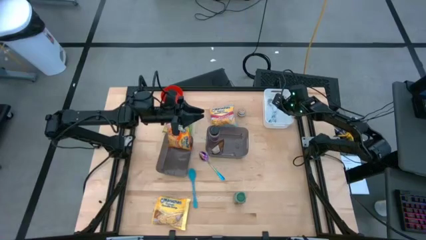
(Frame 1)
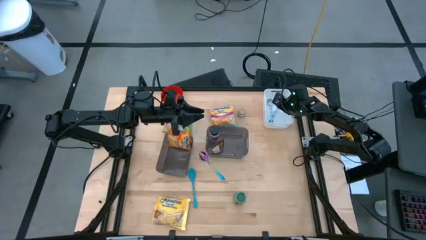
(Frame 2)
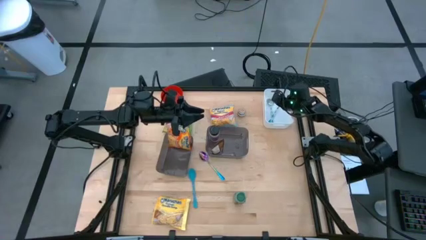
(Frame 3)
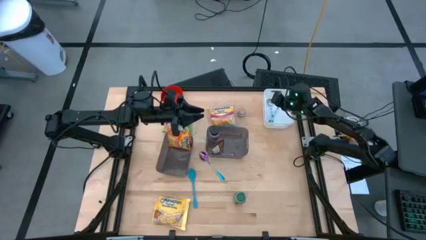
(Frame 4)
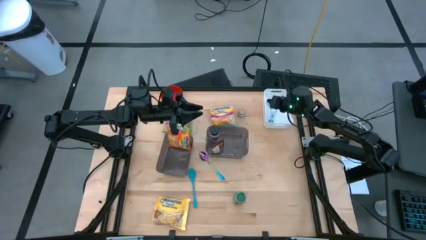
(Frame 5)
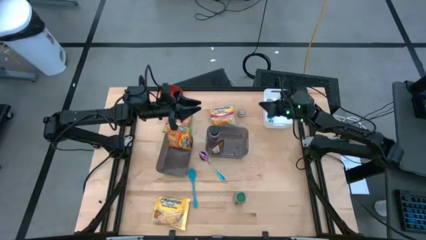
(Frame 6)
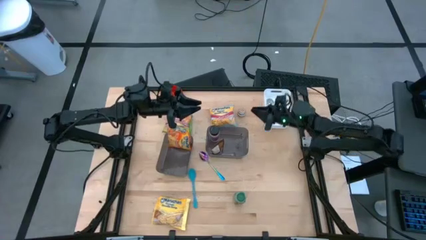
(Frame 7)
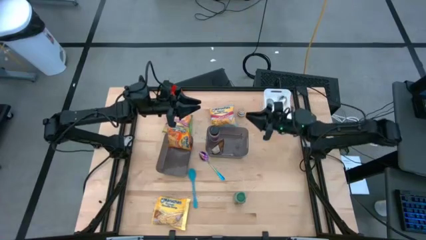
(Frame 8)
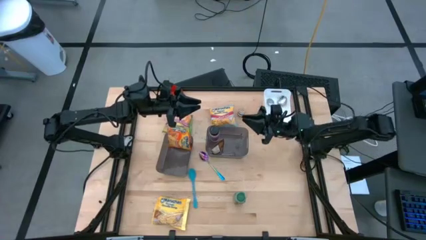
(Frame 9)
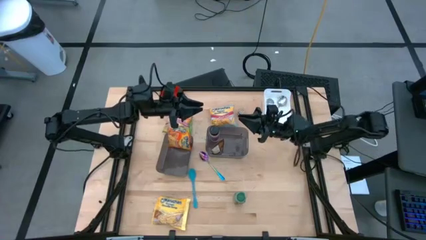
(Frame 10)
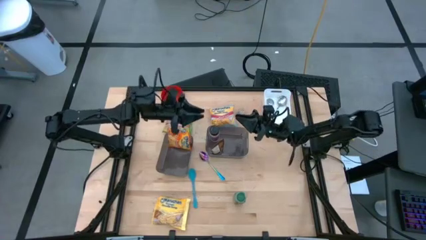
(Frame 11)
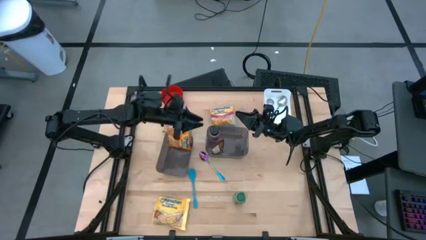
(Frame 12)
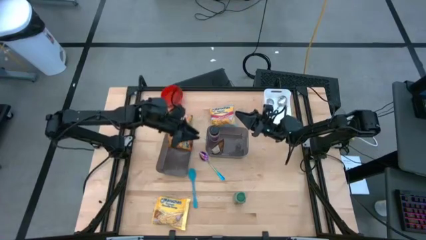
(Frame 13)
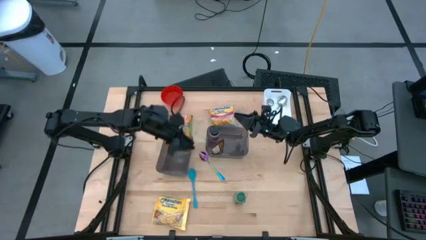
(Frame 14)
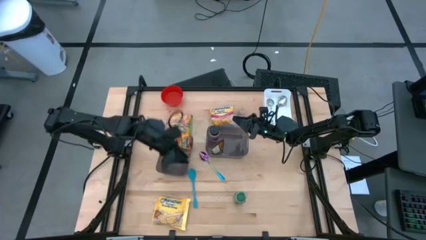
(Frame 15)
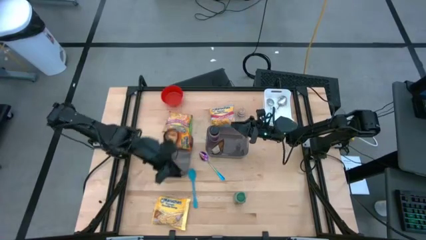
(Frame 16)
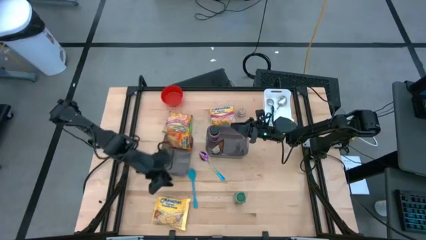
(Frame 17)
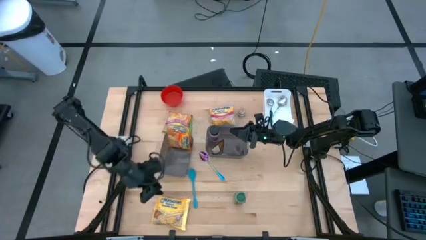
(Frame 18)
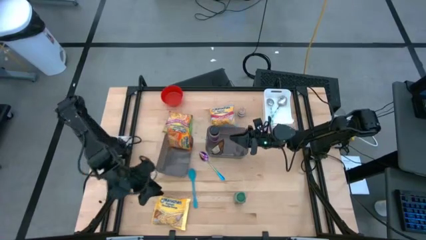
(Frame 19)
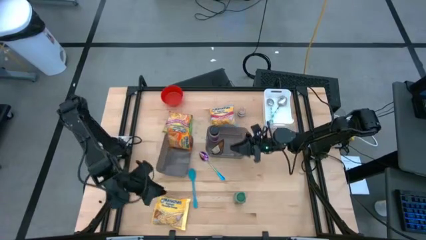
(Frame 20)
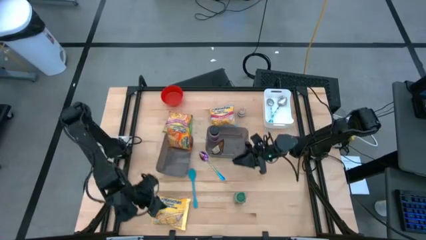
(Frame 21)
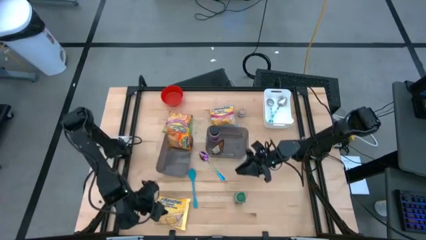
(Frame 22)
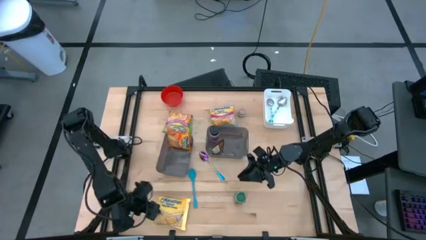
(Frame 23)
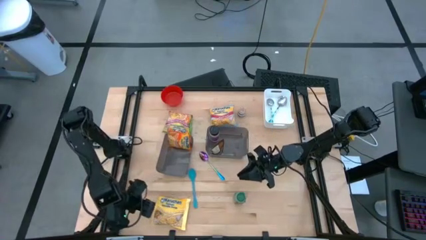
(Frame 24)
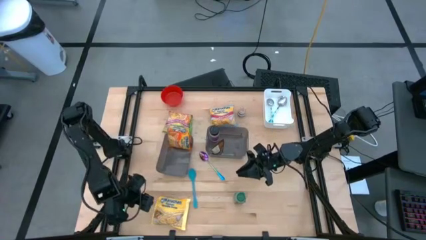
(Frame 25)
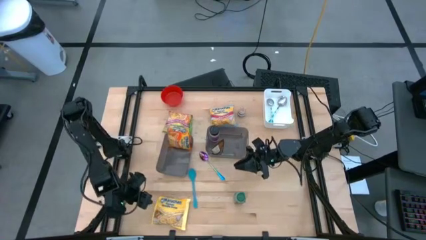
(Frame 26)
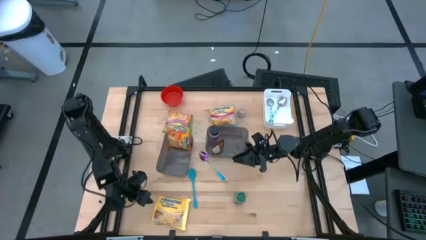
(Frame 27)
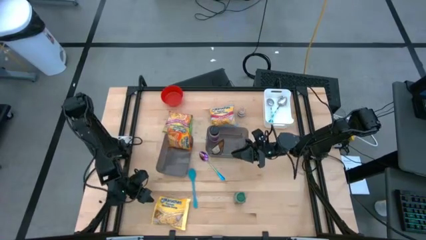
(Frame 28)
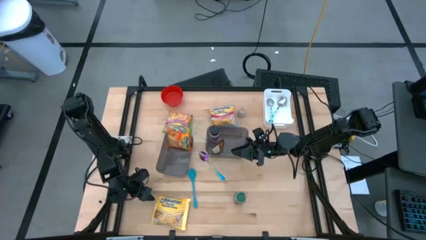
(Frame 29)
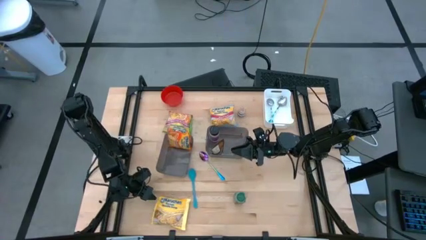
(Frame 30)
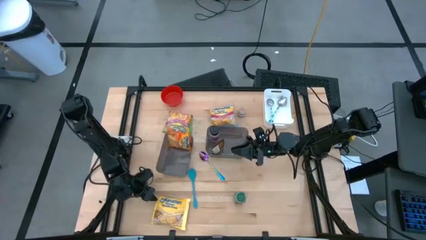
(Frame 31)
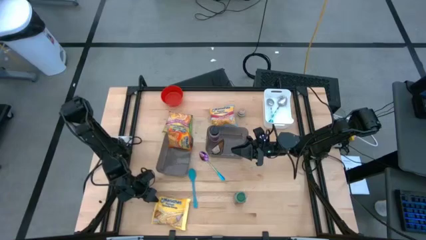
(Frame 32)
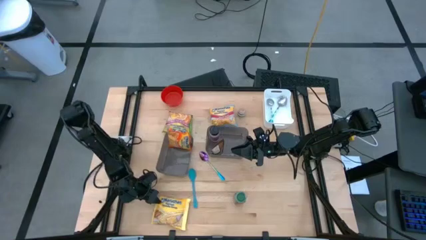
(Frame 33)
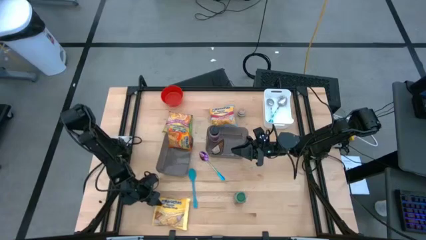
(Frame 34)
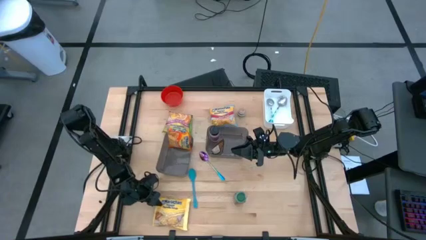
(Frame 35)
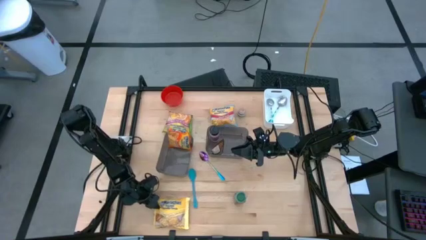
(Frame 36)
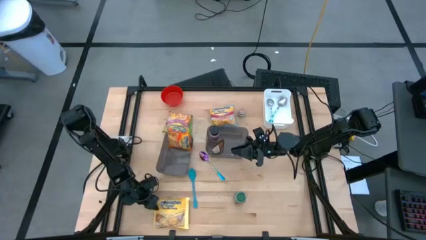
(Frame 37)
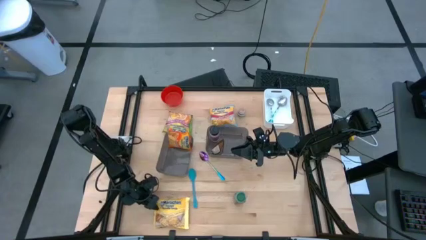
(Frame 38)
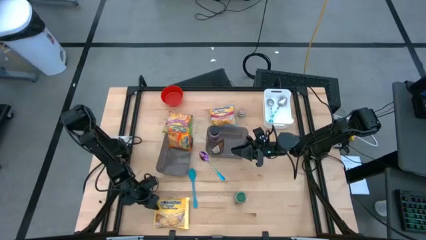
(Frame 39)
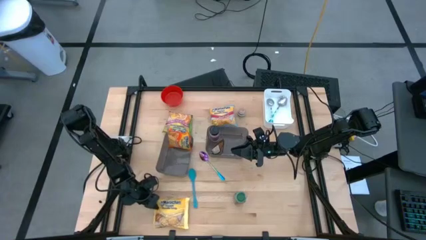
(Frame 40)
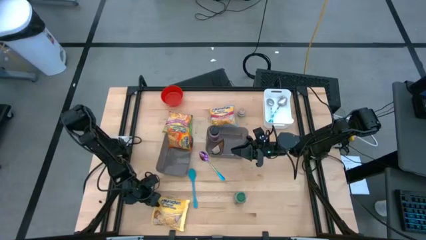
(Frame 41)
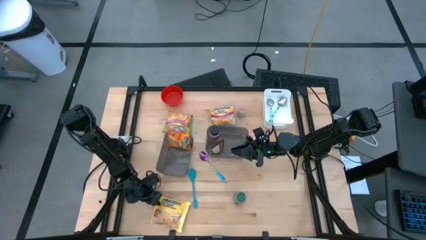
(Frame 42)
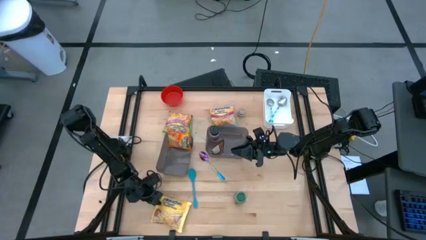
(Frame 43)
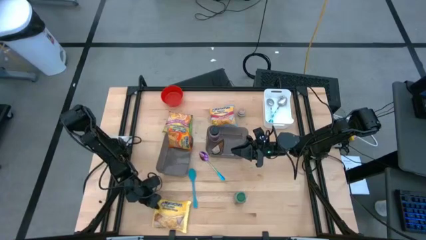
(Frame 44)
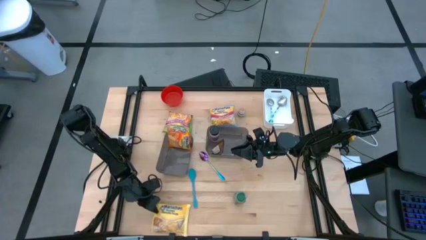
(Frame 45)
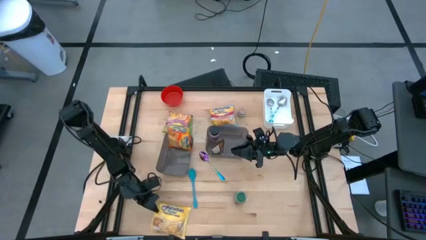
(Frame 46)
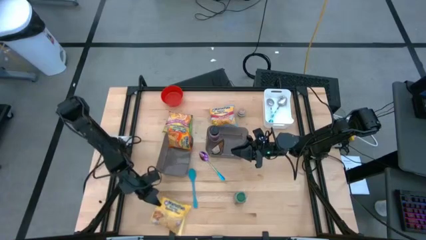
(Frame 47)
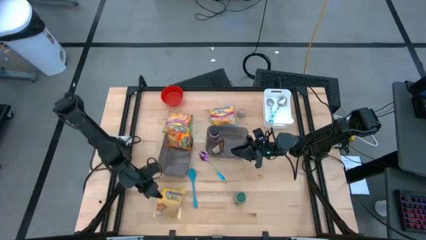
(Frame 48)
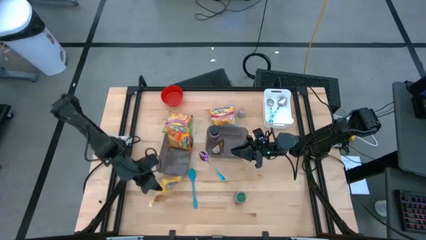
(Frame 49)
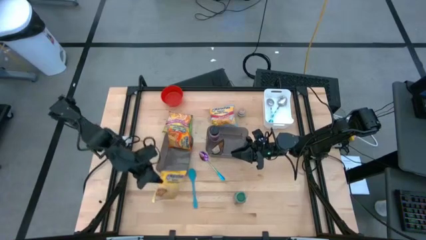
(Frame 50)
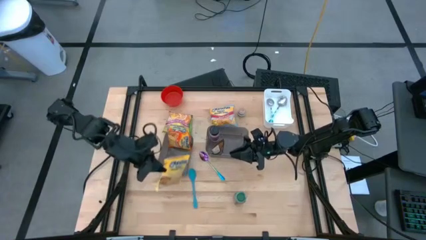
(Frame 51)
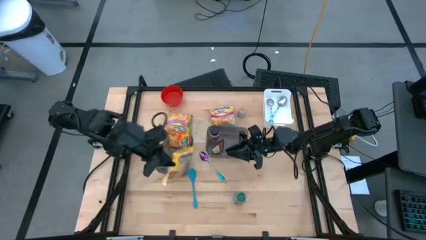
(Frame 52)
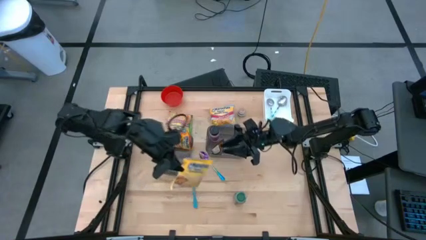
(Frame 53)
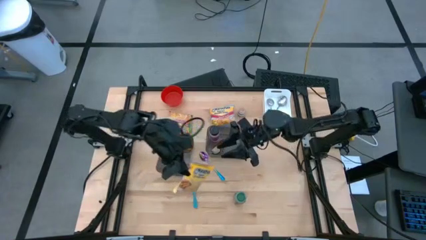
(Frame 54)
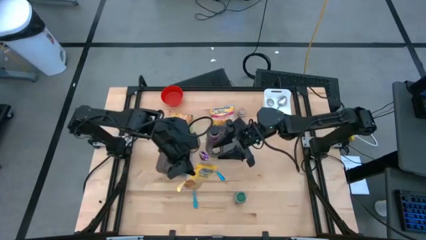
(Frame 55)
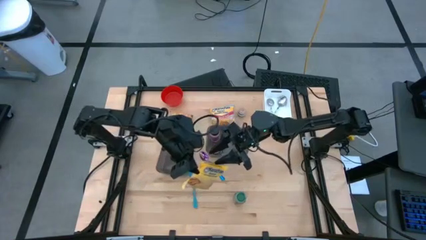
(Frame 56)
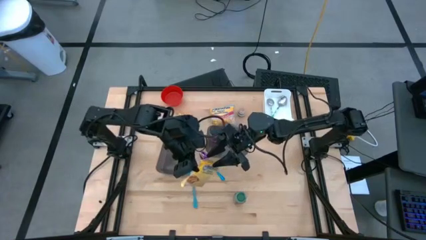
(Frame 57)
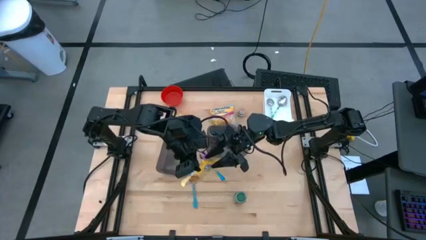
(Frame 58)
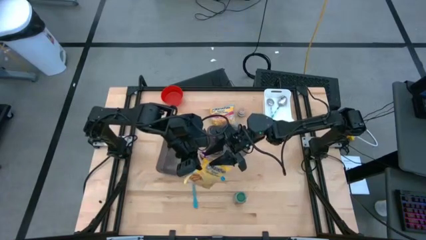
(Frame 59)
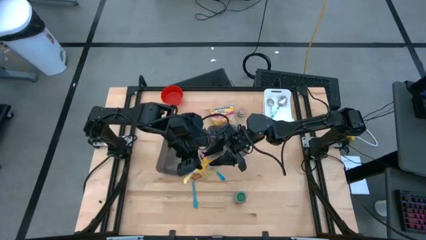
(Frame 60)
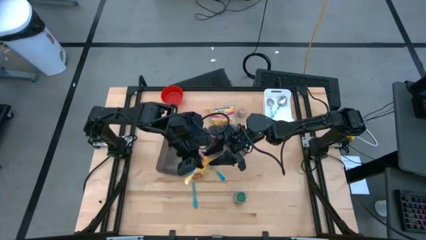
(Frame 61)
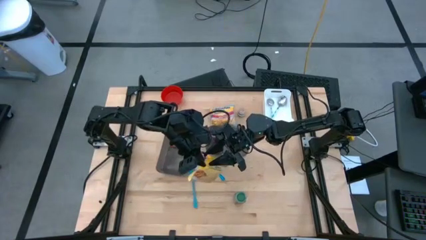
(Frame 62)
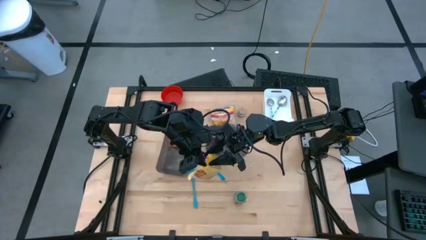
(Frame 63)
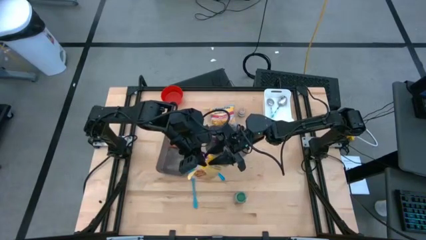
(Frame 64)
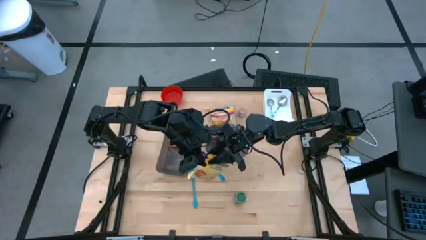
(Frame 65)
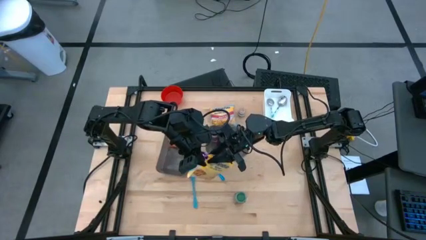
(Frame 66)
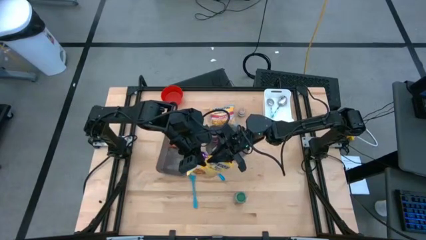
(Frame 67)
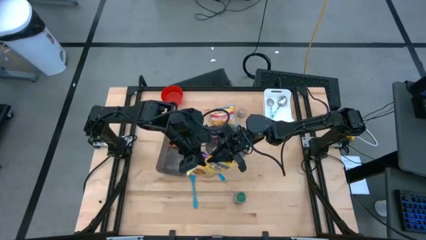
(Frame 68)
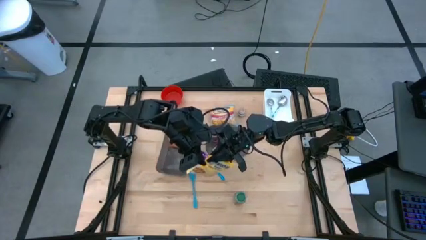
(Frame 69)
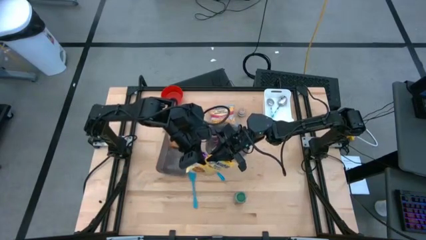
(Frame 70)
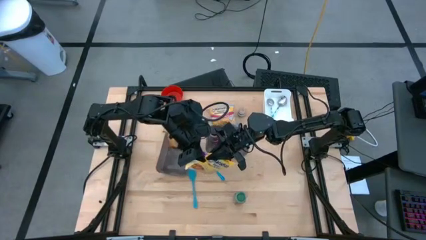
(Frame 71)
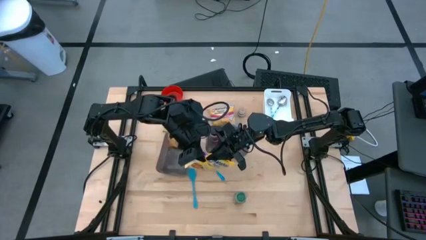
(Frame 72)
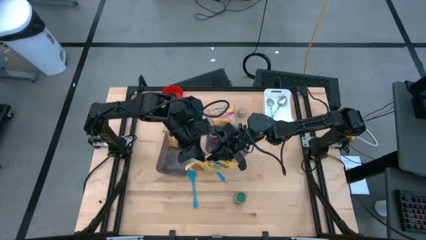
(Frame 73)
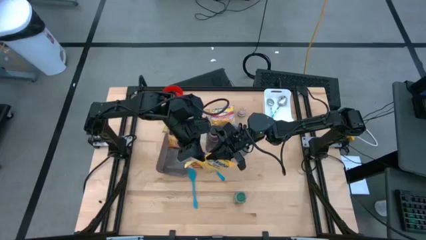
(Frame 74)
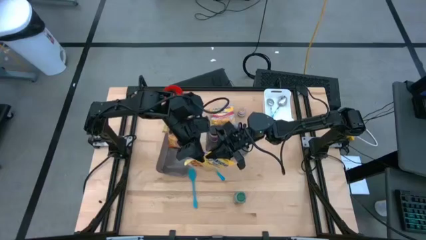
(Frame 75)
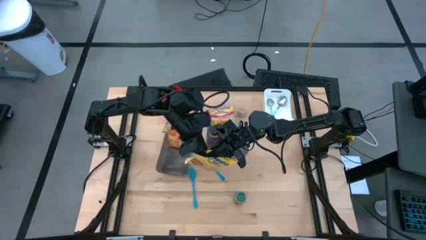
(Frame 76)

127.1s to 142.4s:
Task: Pick & Place Food Item
Put the yellow noodle pack into the left black bin
